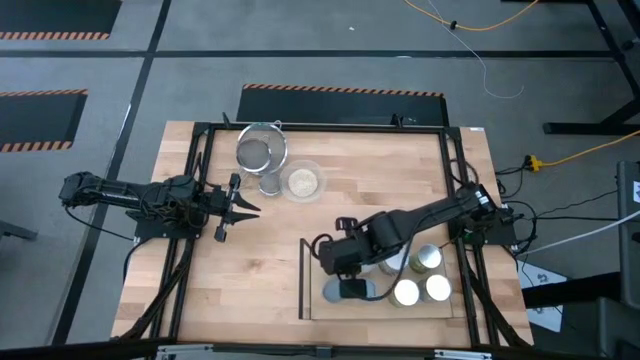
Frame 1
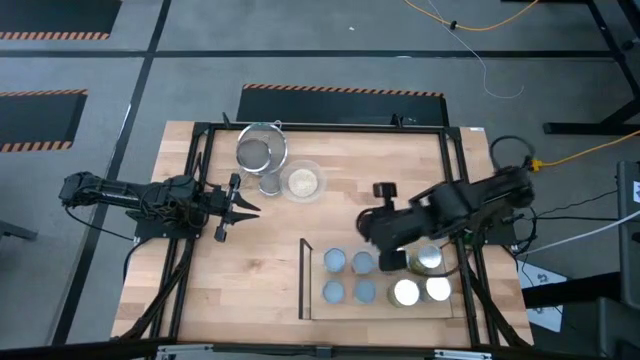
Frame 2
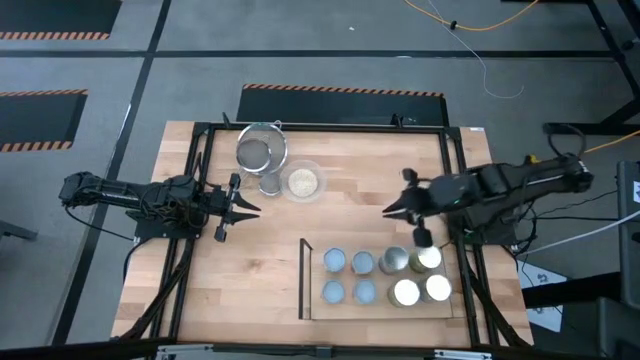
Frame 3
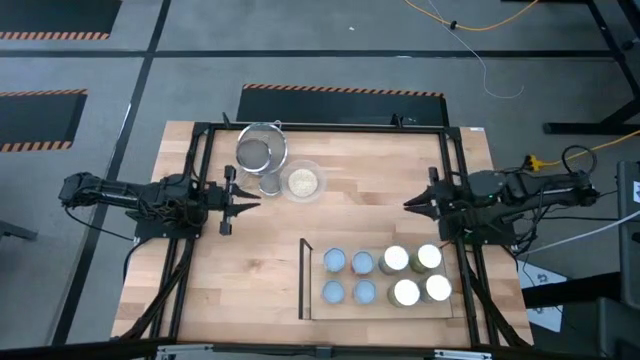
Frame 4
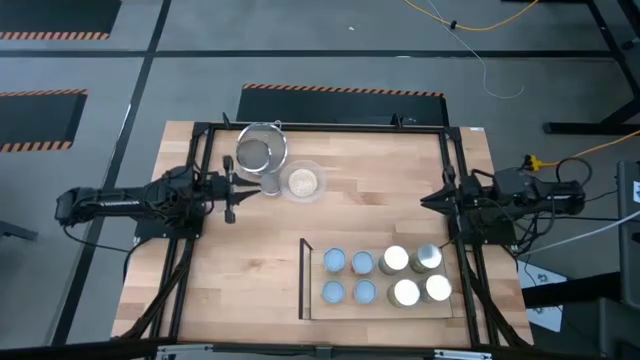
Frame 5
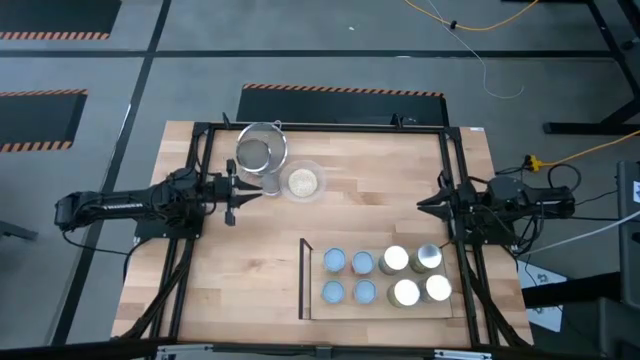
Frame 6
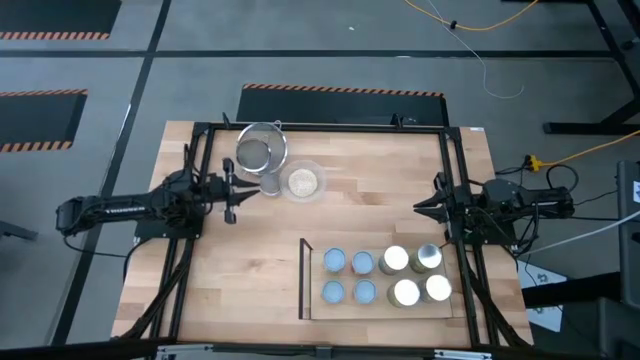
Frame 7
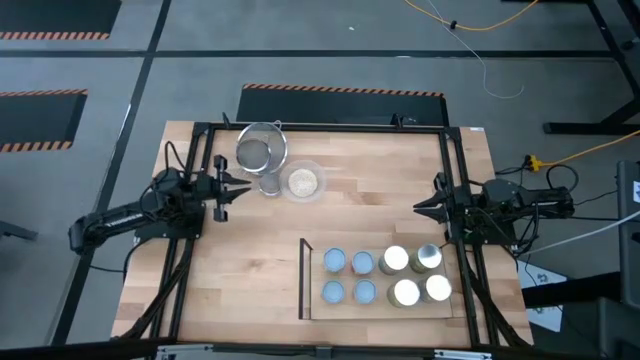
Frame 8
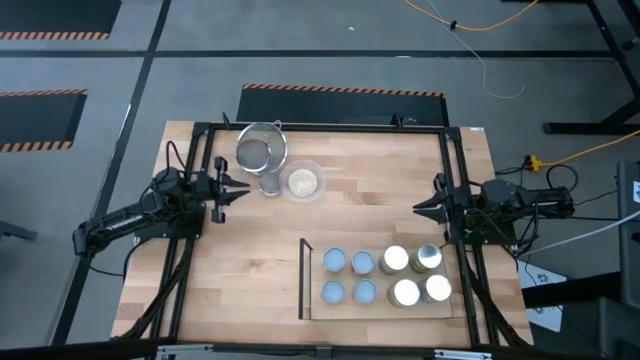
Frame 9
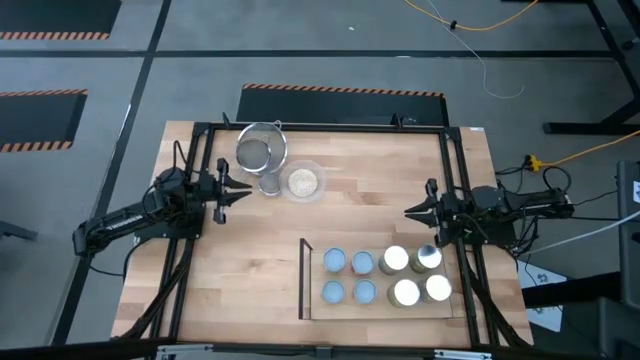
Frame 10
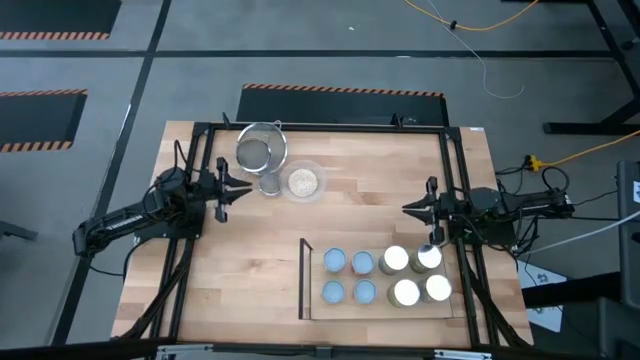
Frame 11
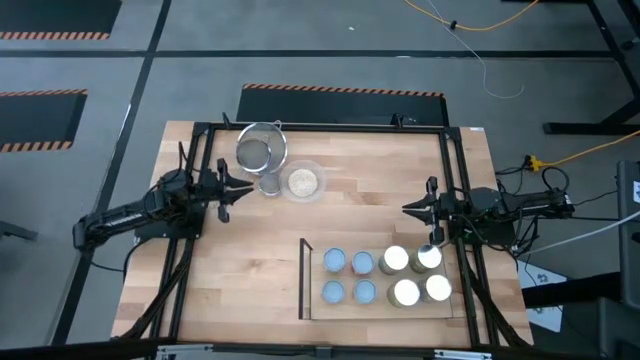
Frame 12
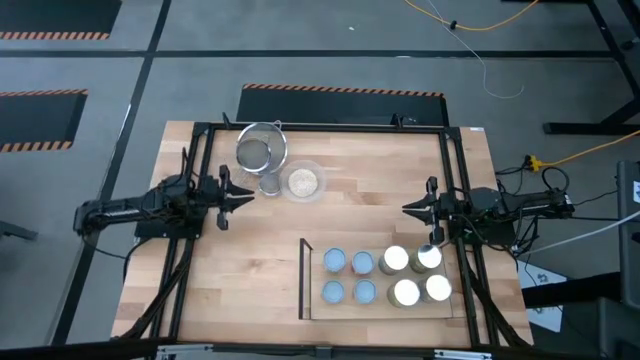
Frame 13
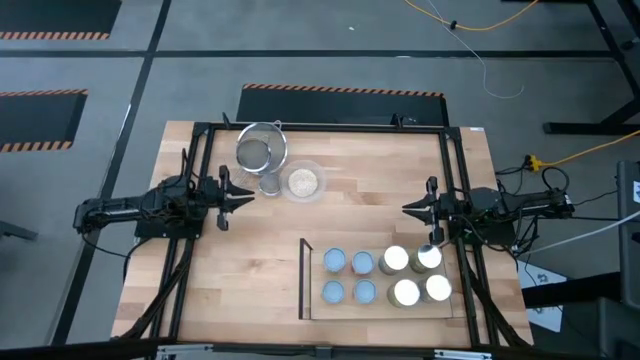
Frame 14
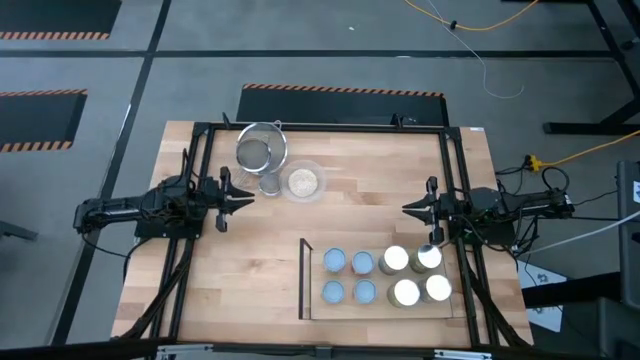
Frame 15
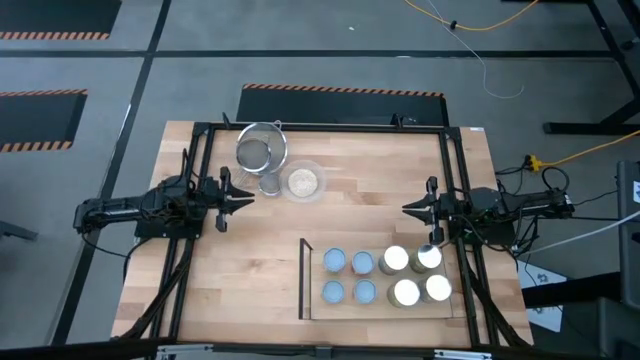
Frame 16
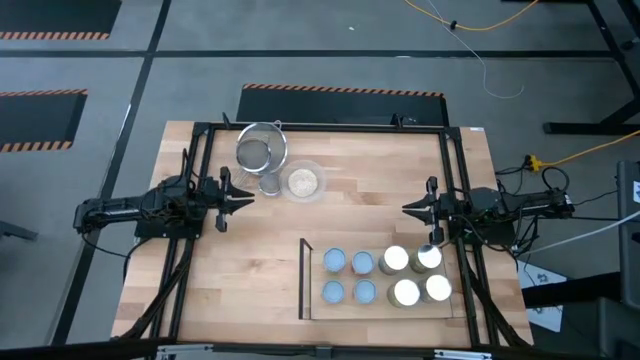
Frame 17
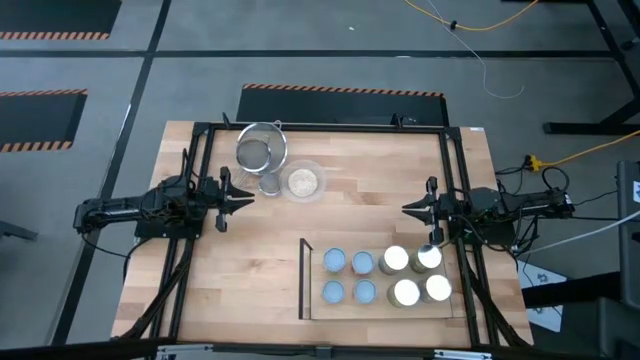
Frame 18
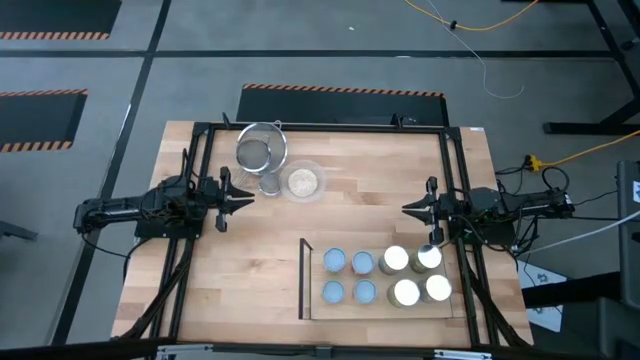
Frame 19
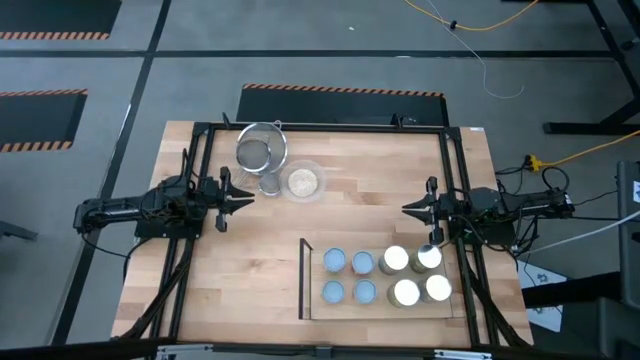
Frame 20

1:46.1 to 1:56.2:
Task: Pick and place cans onto a shelf
Return to Home Position

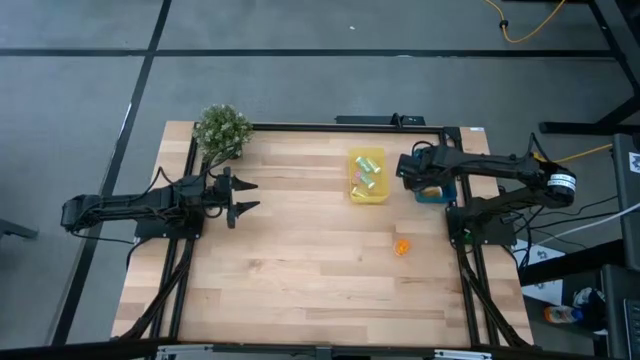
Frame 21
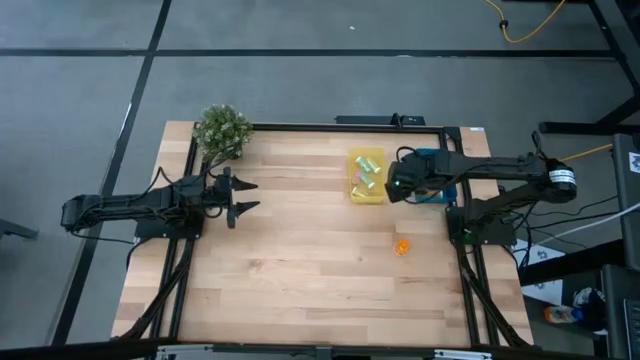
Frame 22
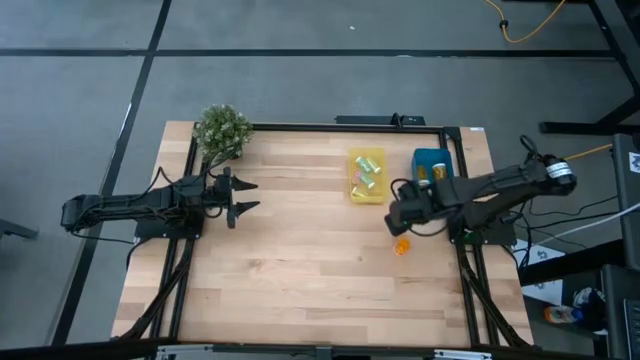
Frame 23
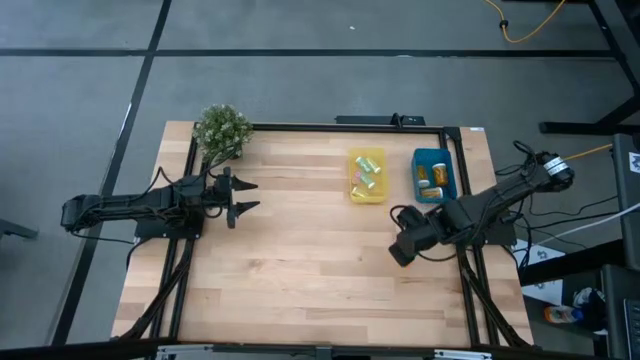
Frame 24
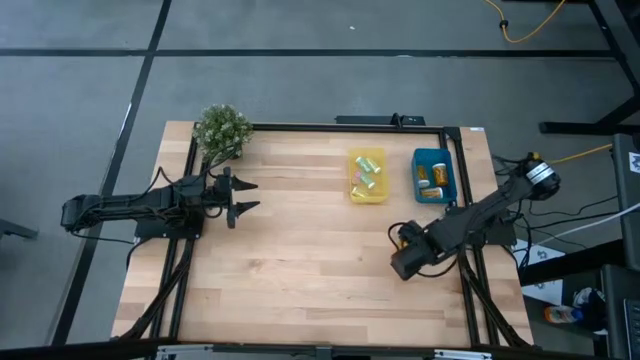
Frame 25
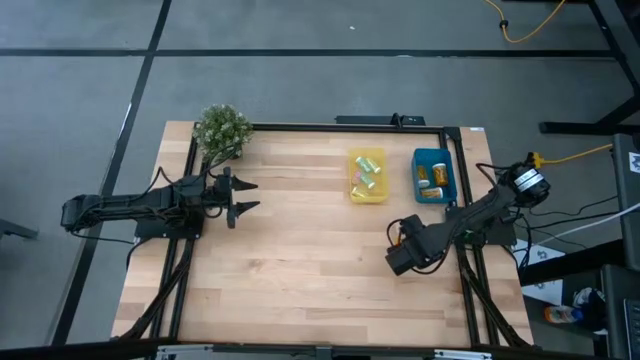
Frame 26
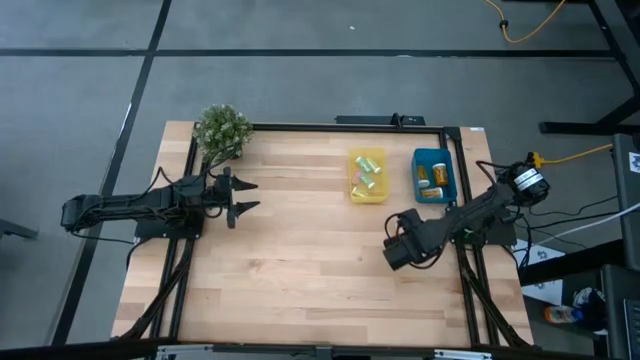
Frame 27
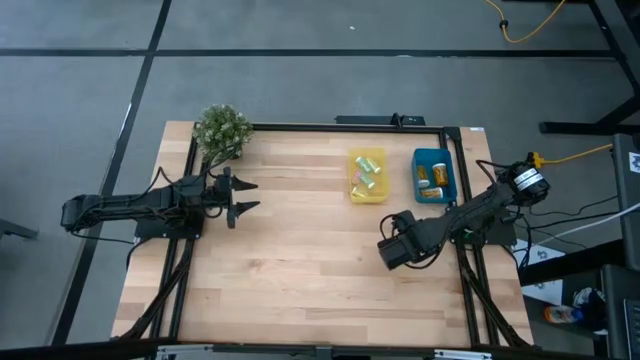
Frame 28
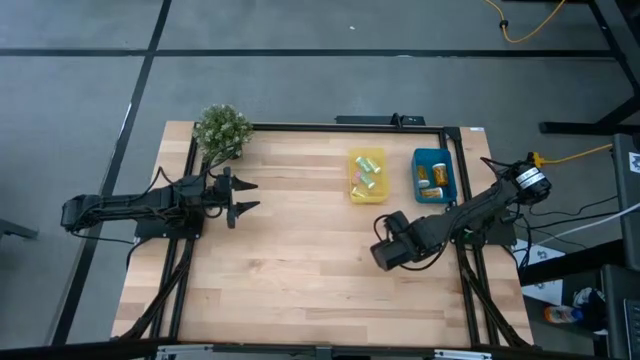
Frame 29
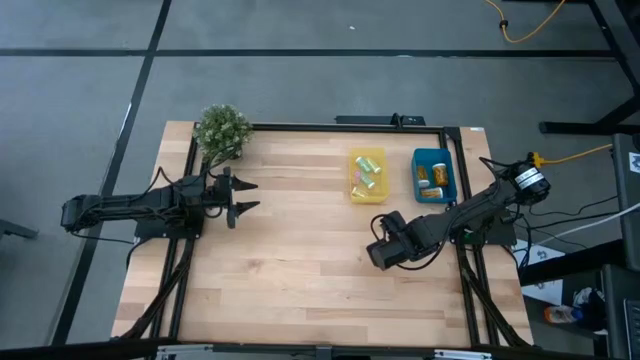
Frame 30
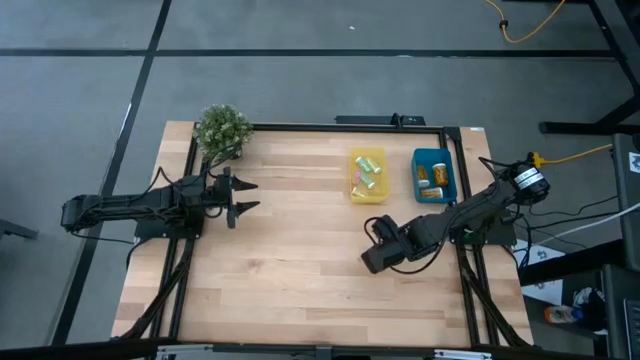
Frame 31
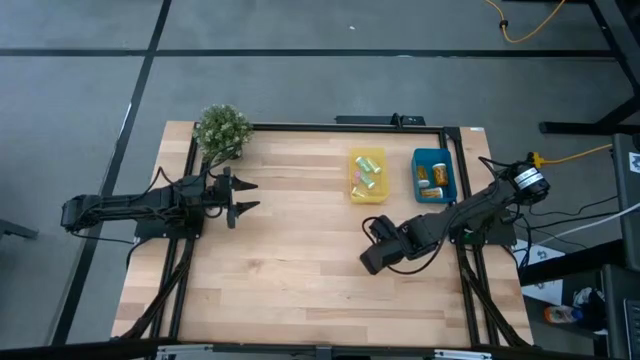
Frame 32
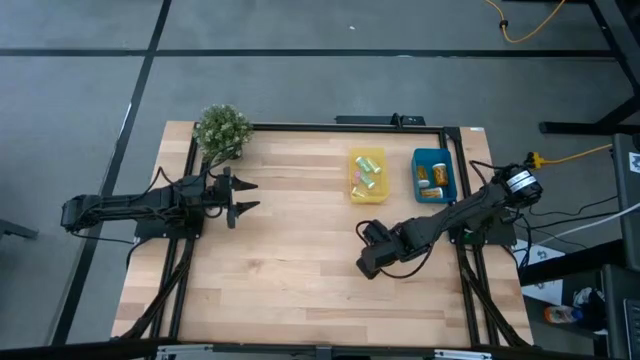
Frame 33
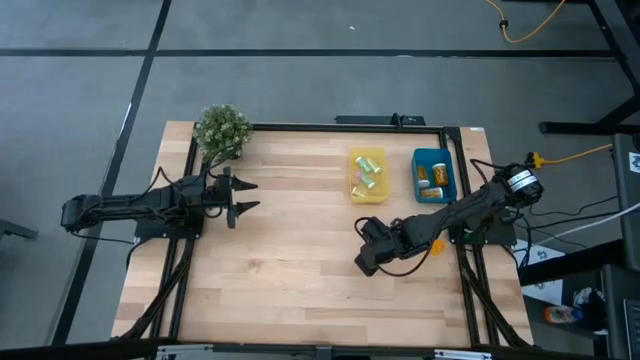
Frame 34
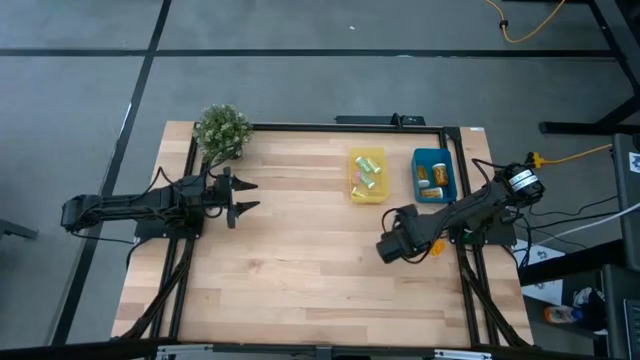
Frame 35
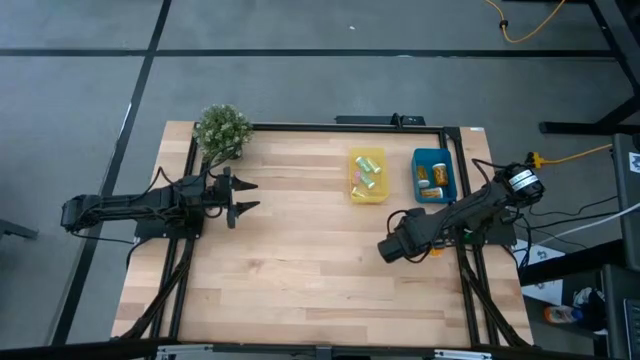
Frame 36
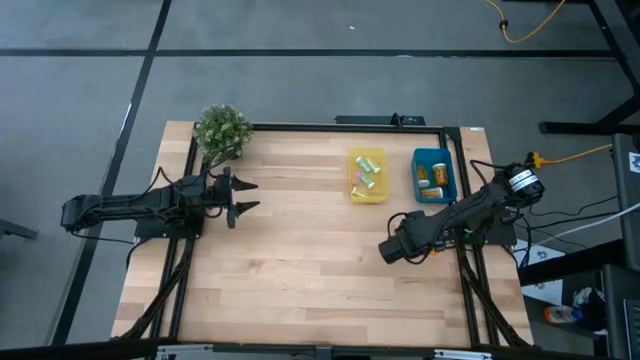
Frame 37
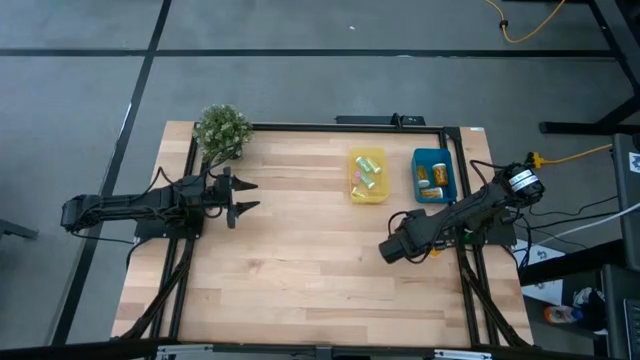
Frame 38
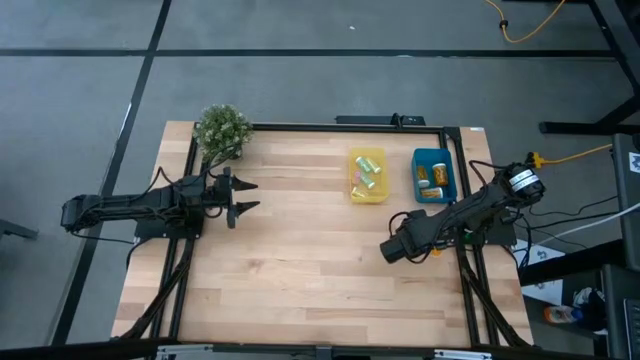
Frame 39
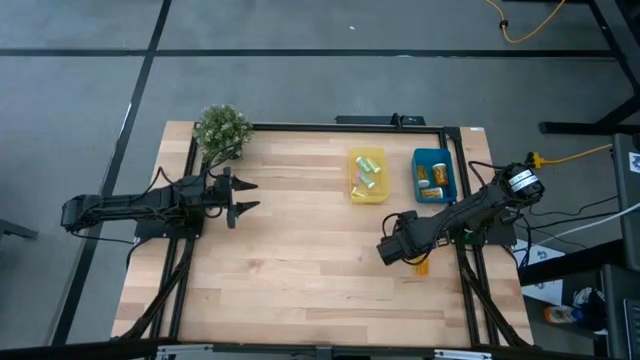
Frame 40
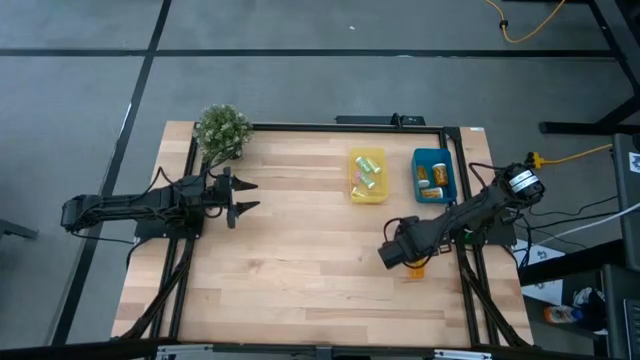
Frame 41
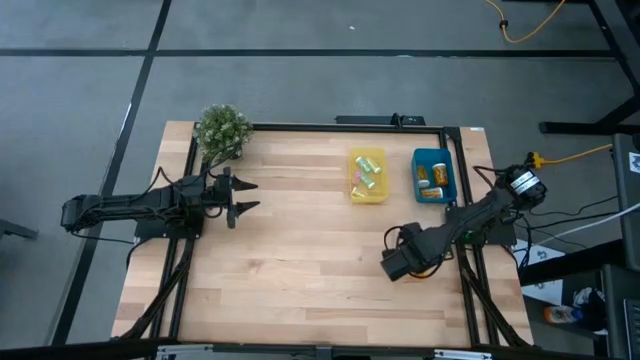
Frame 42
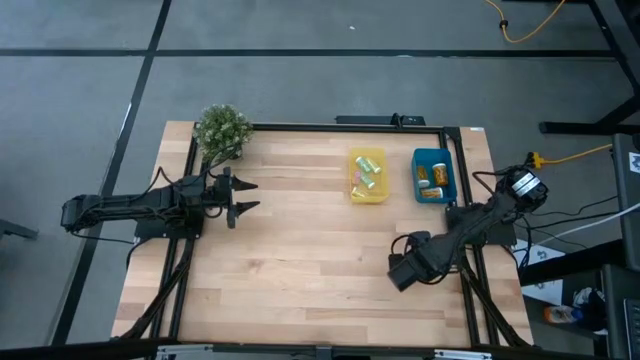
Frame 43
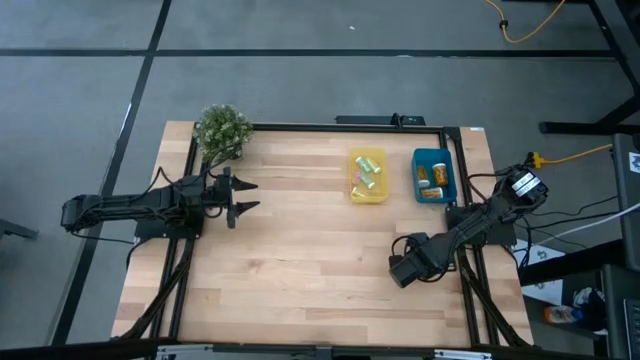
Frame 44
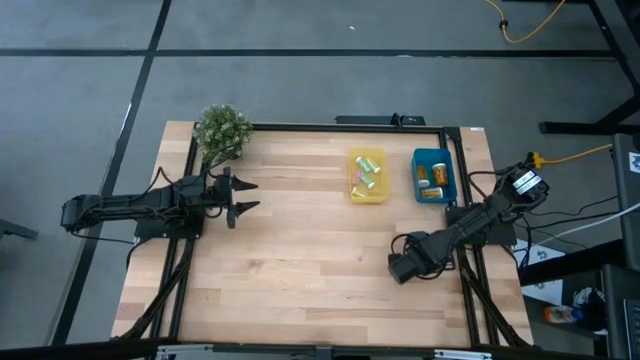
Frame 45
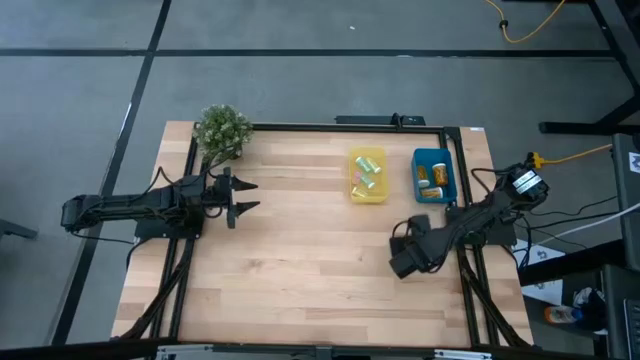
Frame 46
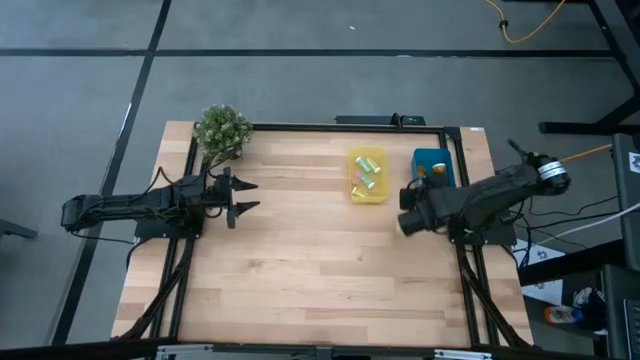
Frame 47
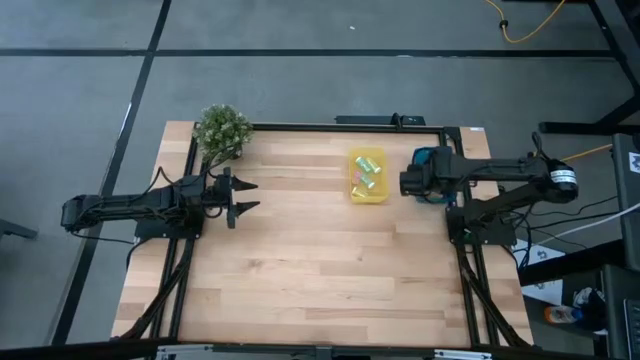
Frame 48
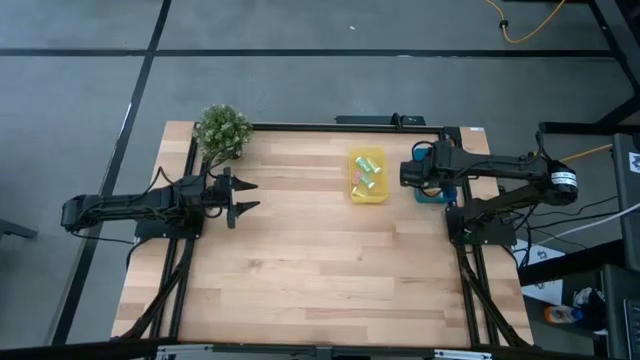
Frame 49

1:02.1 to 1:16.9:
Task: Pick and place medicine bottles into bin by pill shape (circle, oval)
Put the large orange pill bottle into the blue bin
